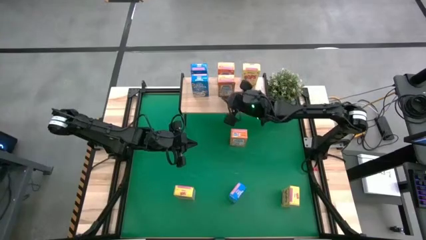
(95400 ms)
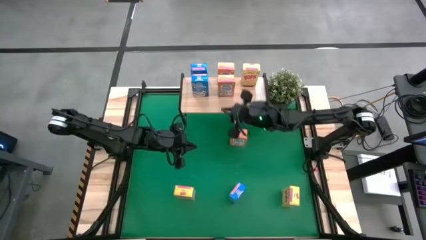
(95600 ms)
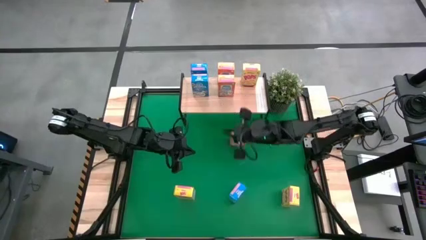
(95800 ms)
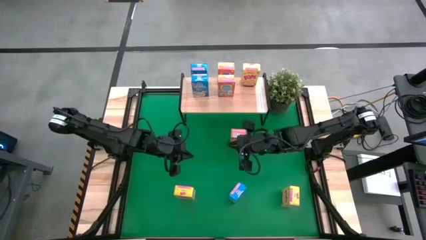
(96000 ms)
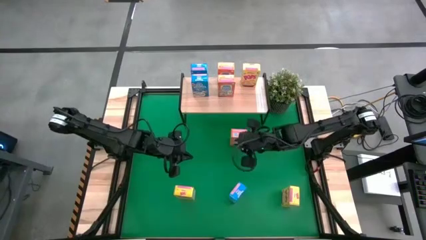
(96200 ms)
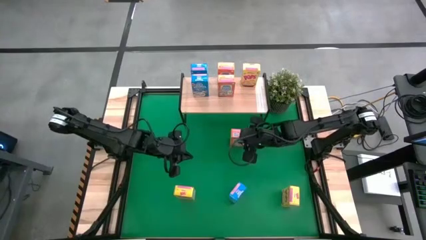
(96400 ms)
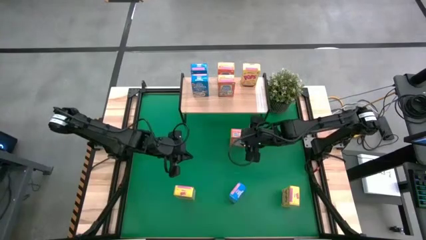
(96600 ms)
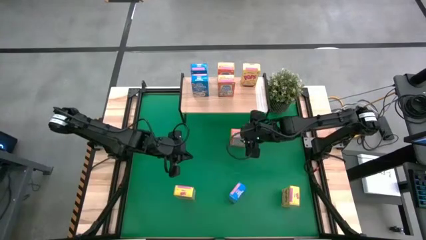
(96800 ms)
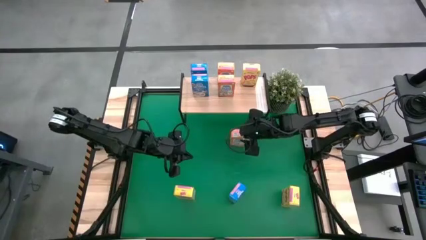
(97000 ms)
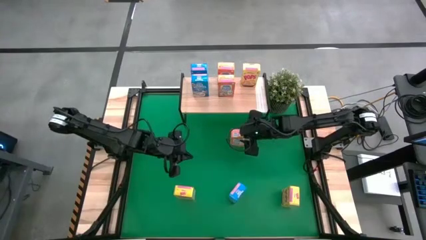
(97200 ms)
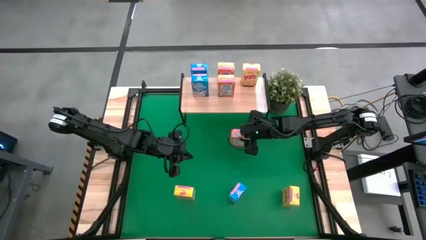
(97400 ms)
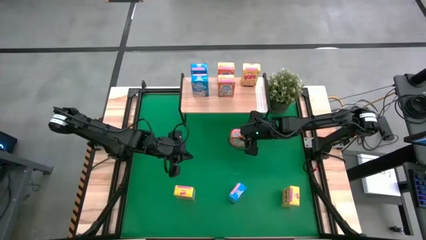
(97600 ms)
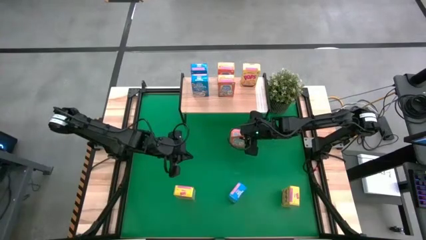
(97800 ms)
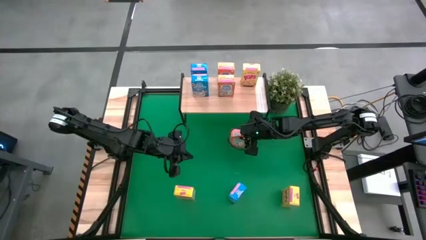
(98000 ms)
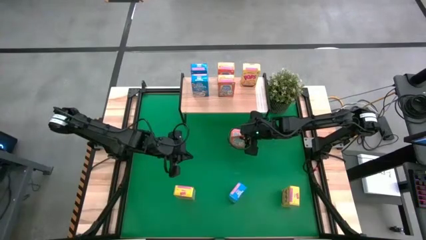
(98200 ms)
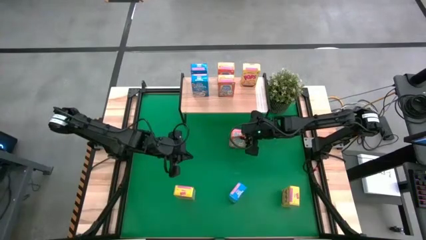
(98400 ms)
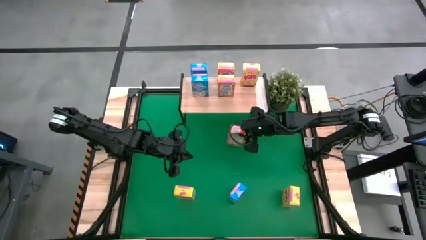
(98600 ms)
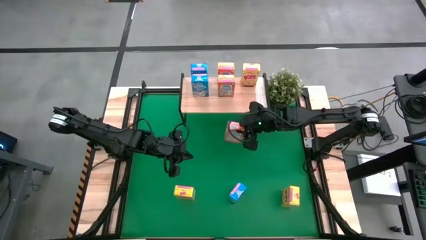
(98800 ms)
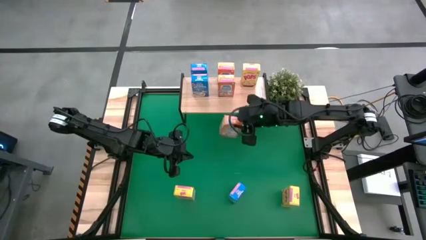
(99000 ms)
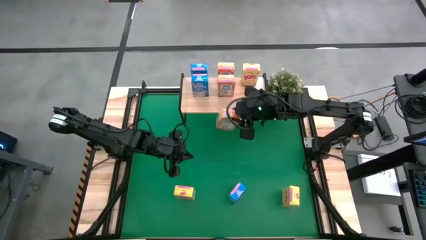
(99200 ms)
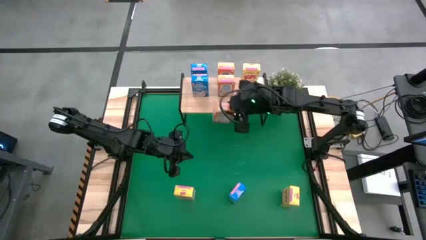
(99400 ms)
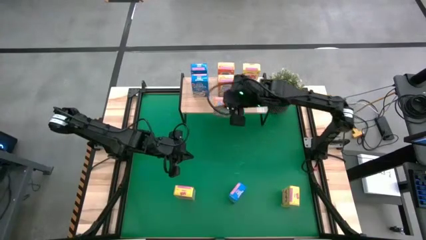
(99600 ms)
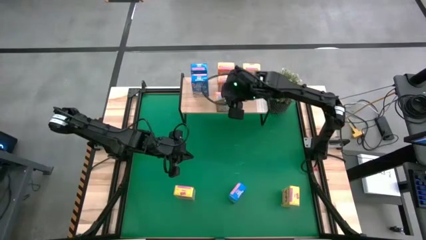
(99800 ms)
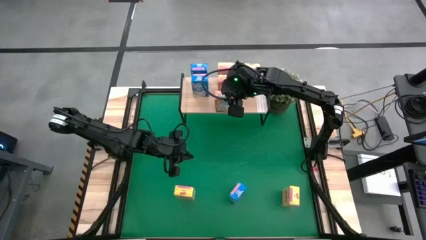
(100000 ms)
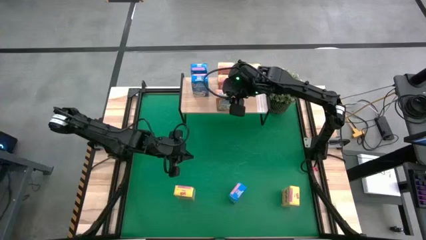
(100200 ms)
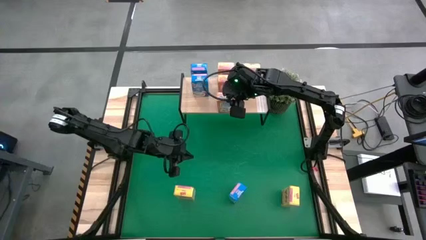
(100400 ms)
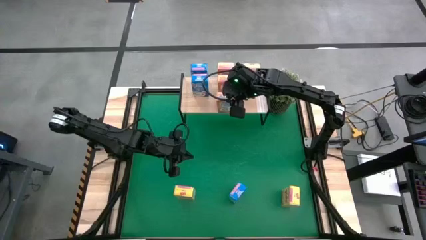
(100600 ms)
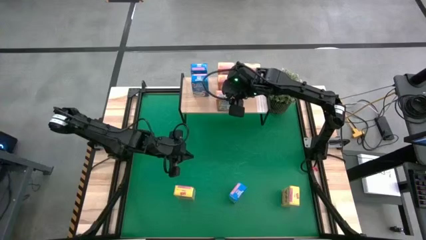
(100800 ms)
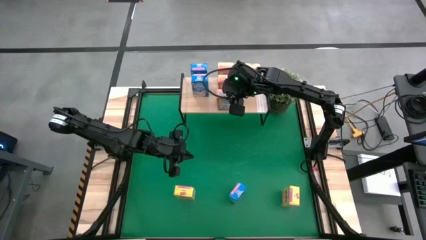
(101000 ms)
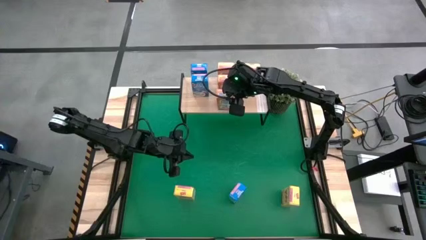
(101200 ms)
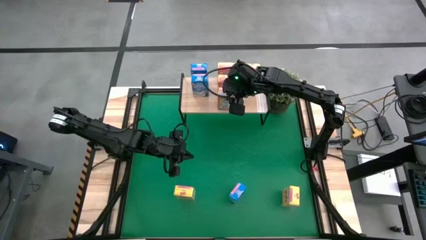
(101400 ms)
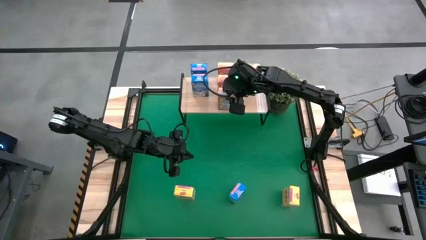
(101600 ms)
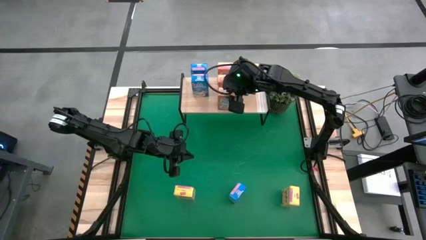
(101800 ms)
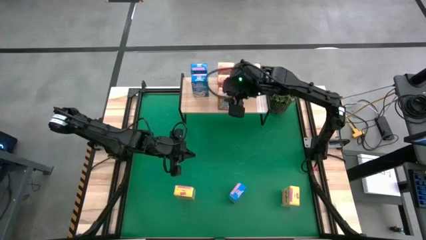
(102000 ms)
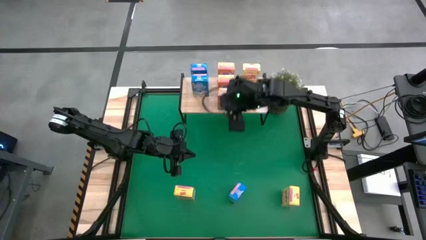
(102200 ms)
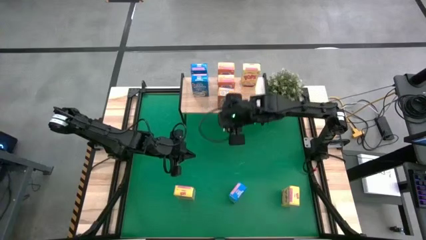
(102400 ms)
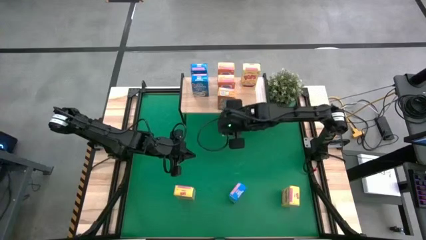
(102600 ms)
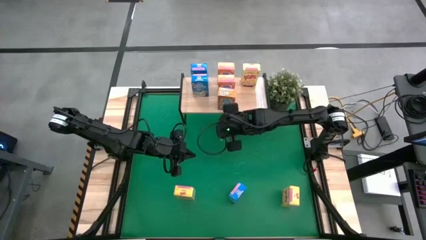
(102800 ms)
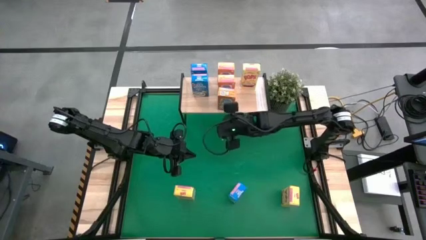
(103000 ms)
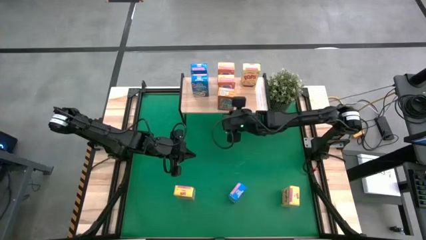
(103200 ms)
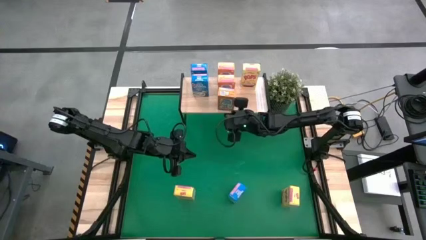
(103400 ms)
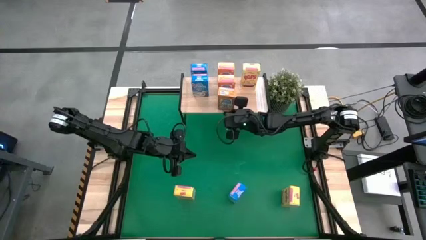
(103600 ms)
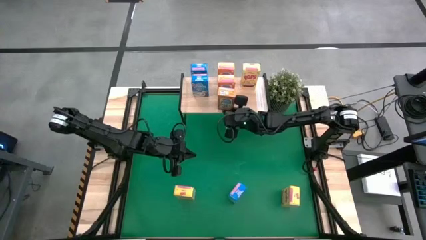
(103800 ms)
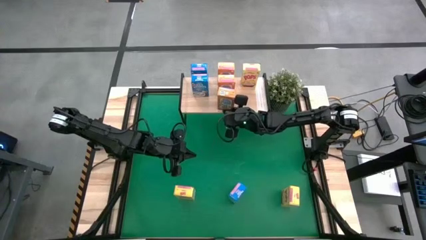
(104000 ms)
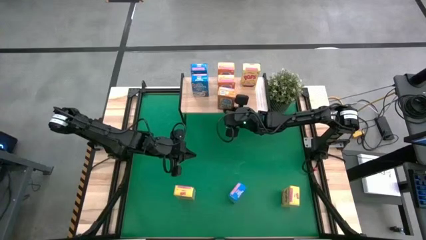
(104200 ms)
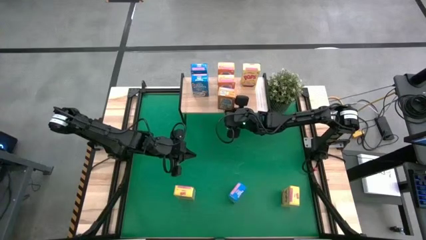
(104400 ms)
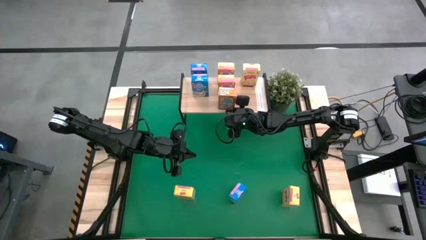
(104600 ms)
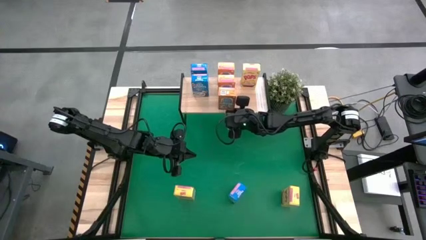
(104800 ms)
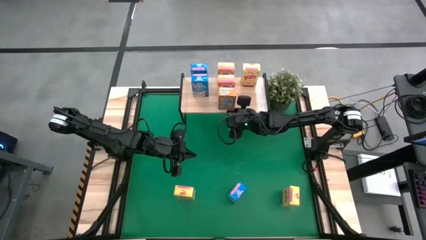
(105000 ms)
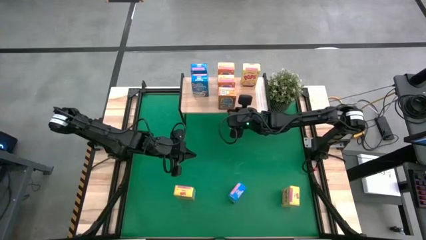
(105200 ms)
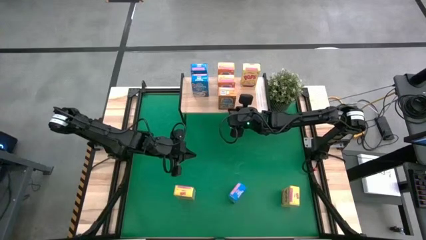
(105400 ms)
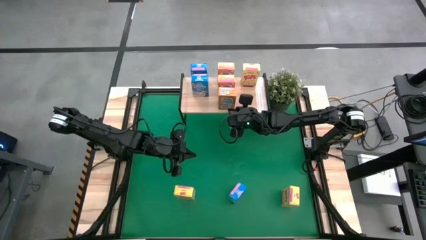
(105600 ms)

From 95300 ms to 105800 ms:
Task: Stack cereal on shelf
Put the orange cereal box on the shelf

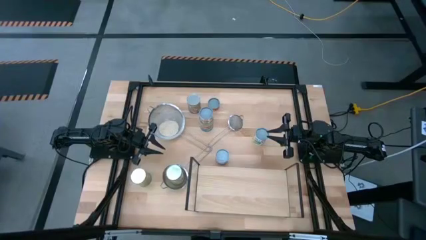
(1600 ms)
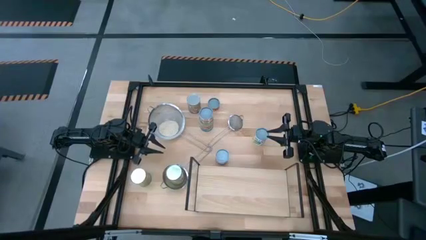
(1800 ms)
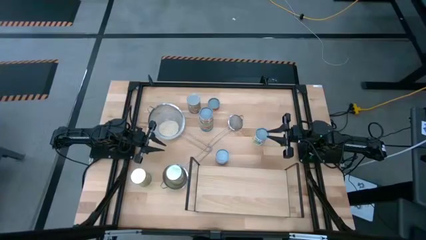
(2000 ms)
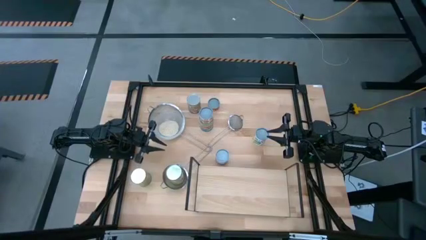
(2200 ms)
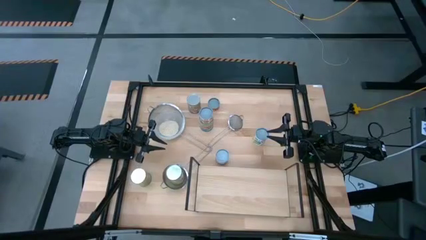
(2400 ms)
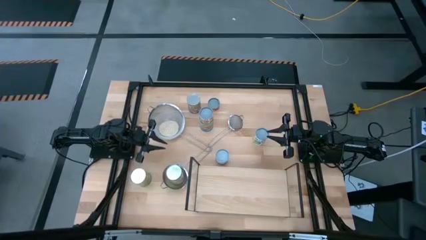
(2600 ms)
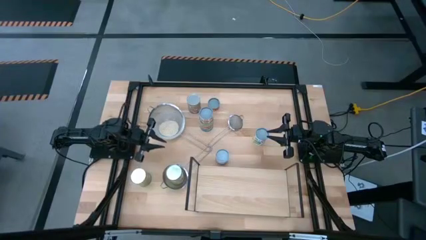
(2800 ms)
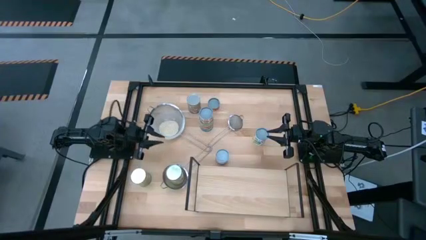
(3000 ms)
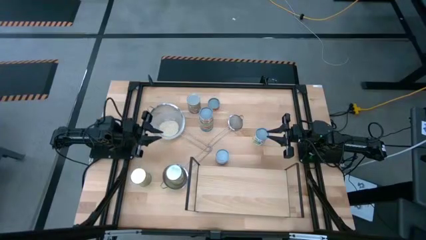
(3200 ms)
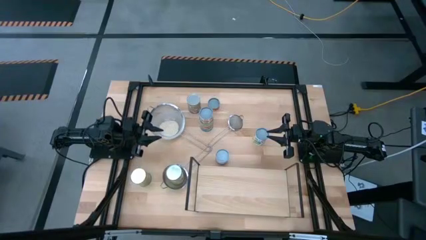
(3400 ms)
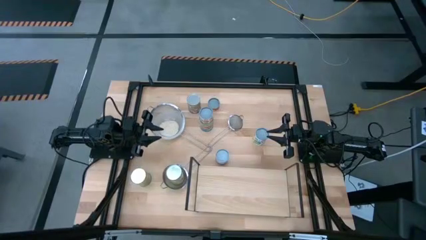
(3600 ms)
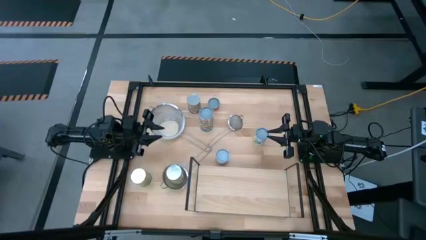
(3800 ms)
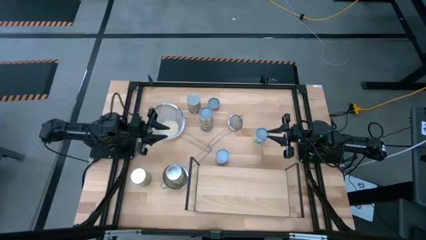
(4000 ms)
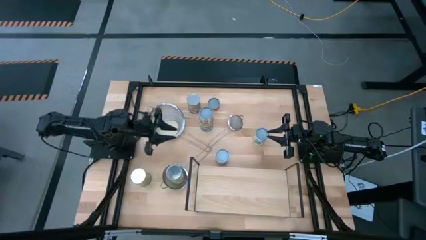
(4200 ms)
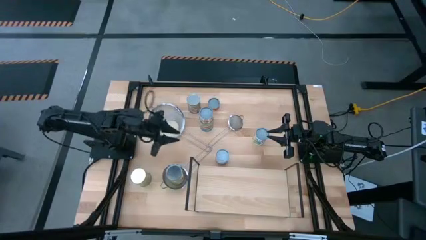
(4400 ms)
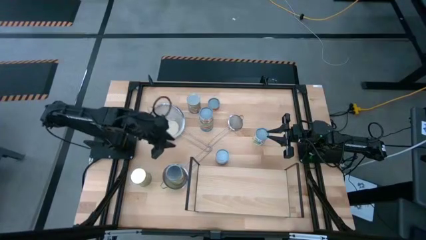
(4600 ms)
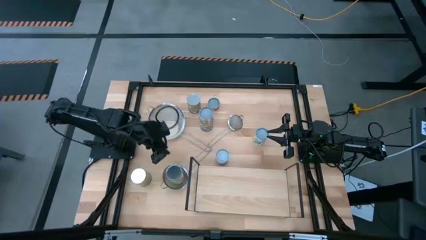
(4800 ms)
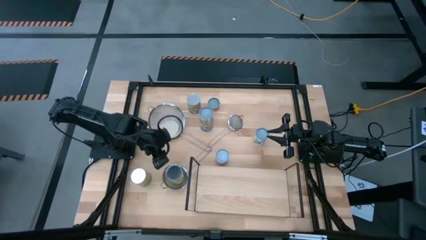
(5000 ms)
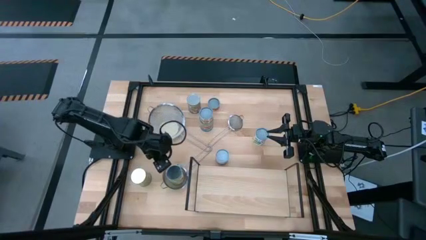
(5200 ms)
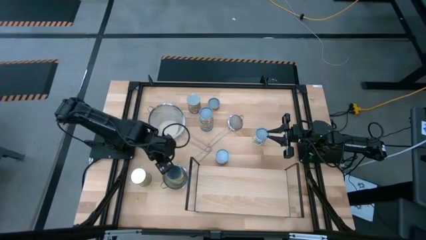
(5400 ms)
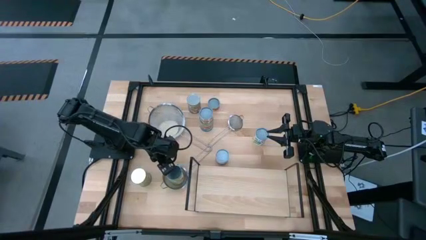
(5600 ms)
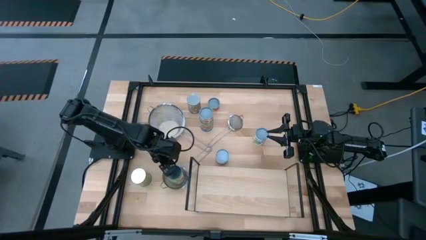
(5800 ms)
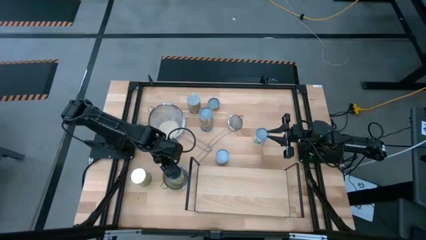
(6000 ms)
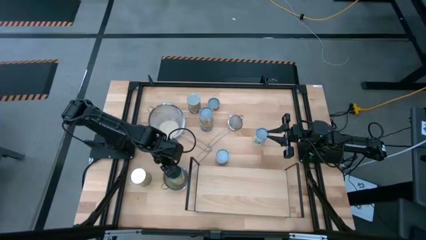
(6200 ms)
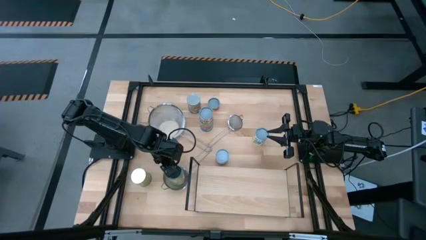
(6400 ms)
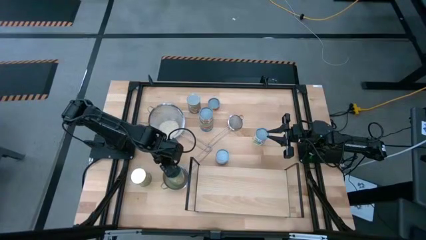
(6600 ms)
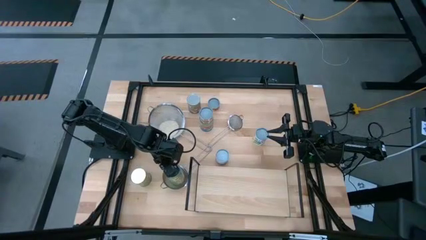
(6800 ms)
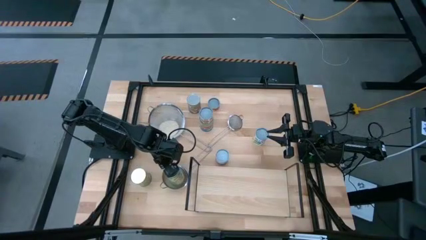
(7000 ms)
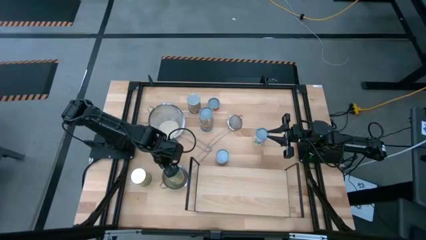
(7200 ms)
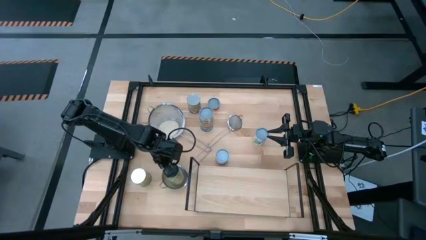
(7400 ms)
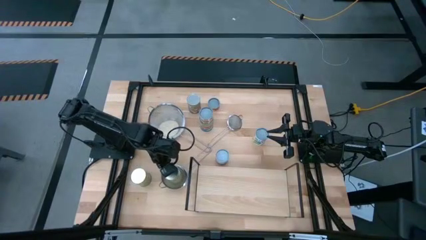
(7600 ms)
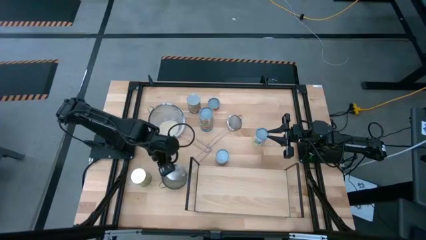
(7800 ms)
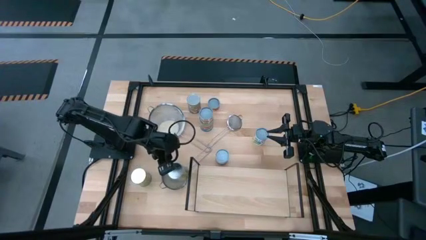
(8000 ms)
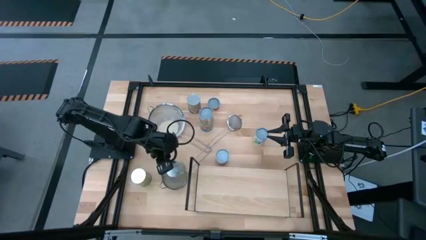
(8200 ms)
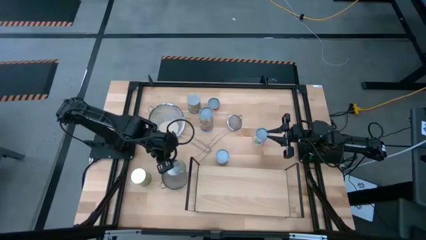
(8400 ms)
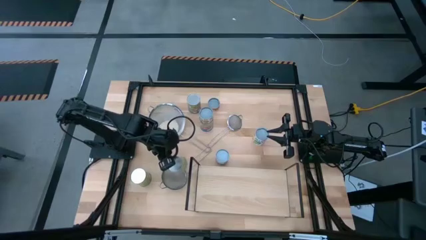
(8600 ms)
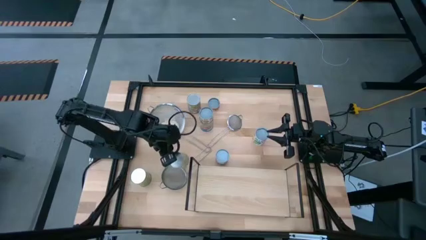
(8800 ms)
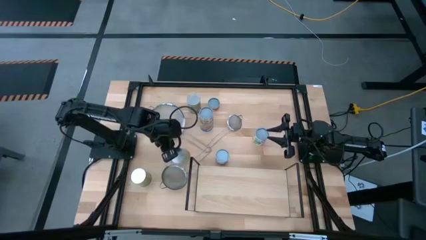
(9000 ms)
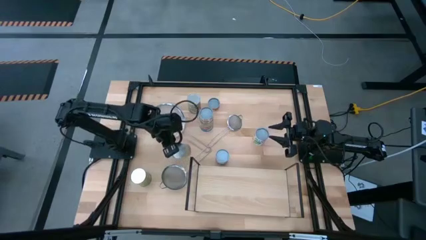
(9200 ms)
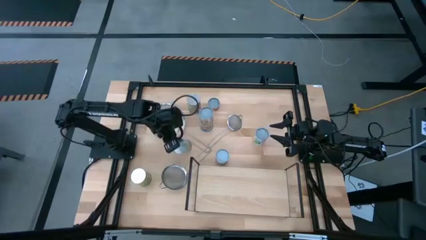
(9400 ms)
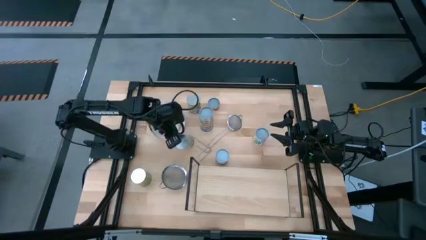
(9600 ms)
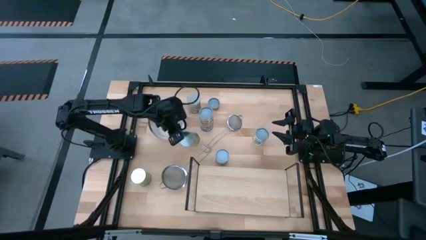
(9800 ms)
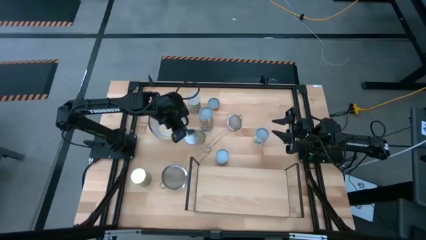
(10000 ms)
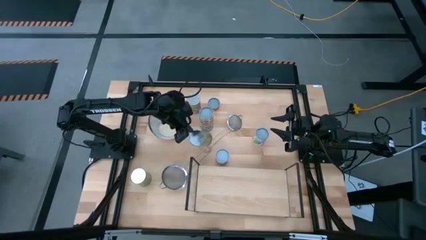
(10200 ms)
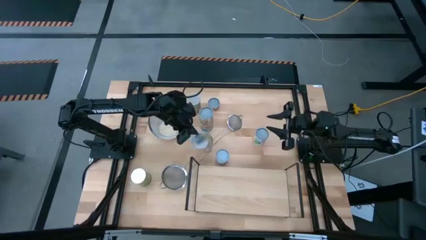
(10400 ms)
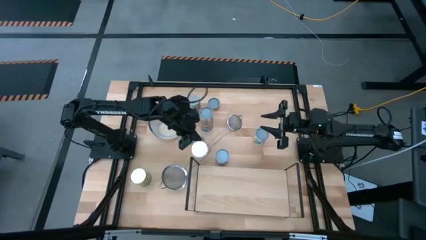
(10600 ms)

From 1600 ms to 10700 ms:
Task: Pick and place cans onto a shelf
Put the canned oranges on the shelf
